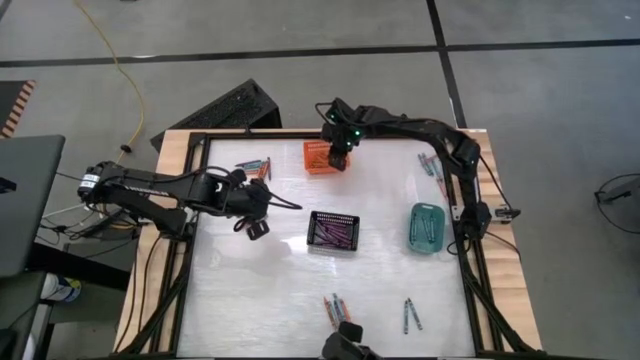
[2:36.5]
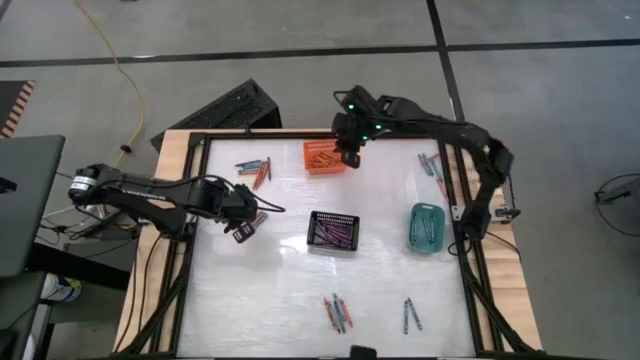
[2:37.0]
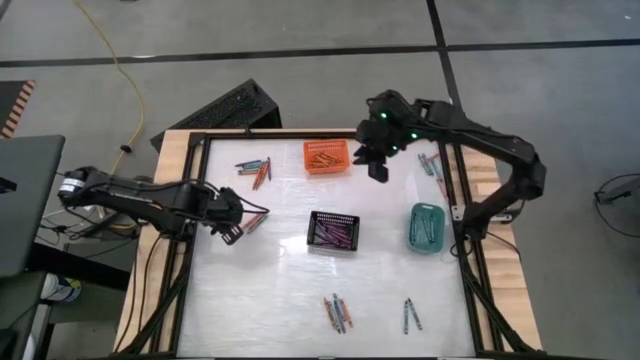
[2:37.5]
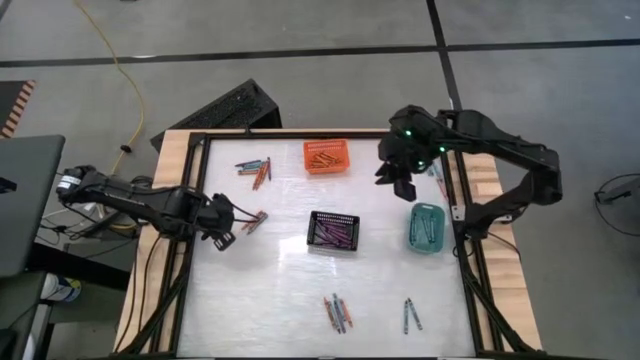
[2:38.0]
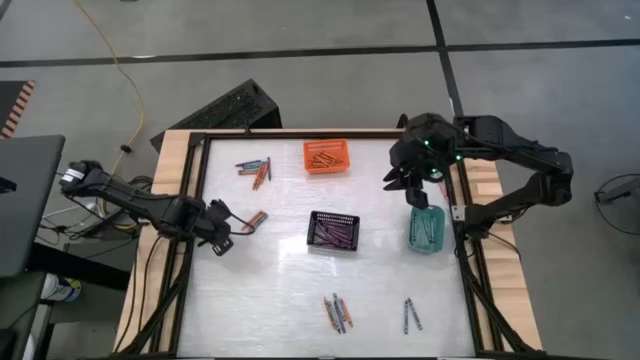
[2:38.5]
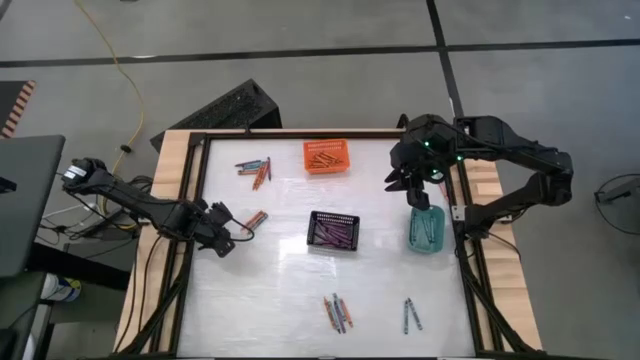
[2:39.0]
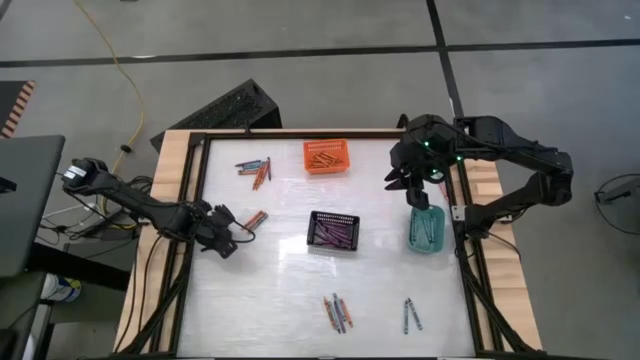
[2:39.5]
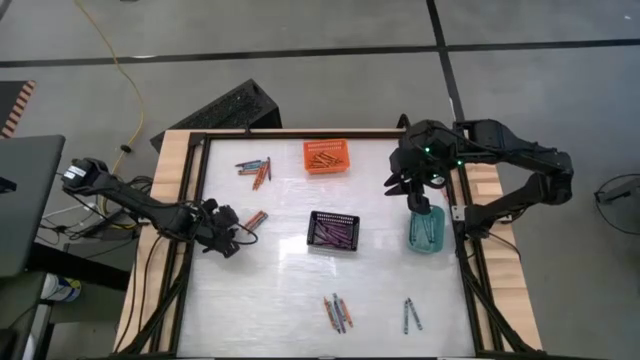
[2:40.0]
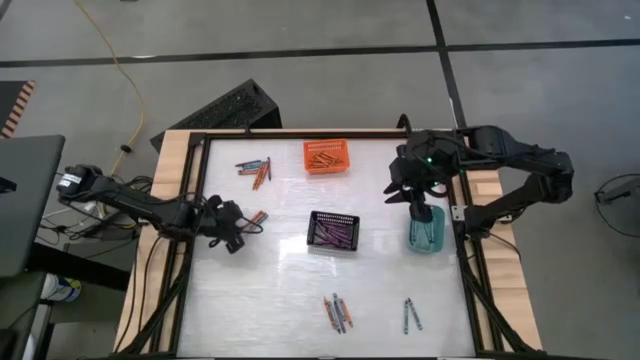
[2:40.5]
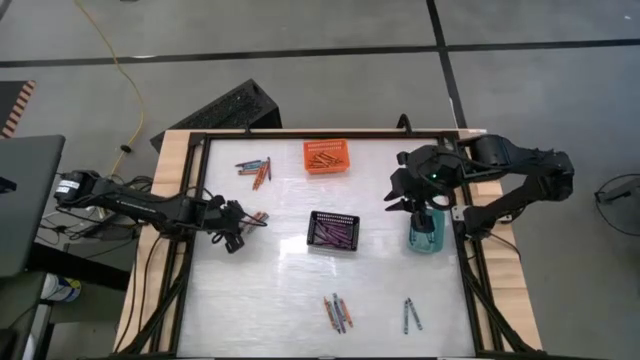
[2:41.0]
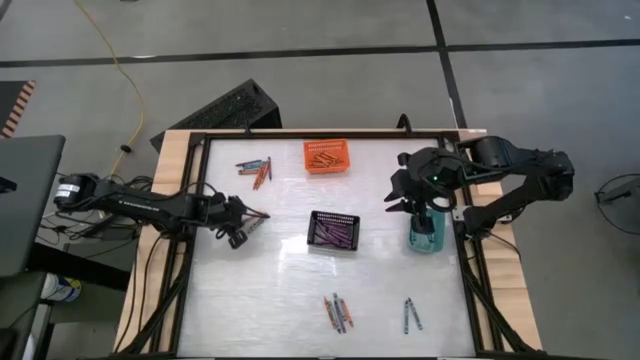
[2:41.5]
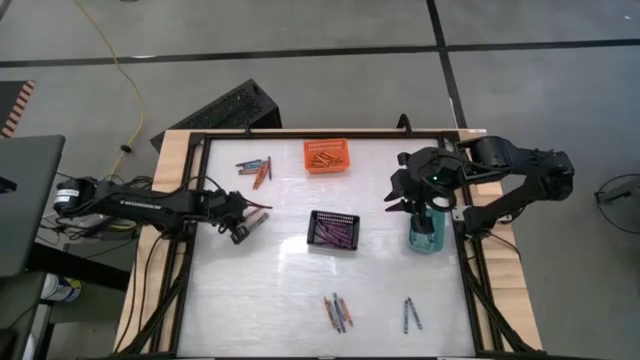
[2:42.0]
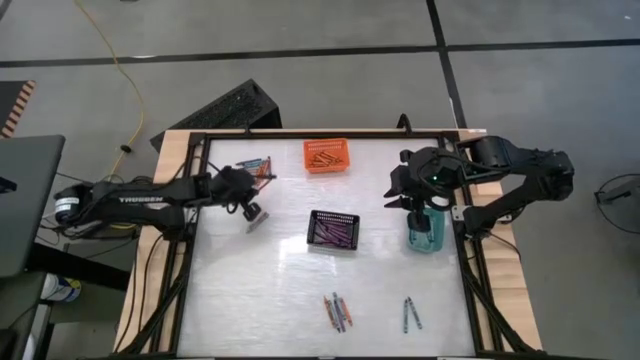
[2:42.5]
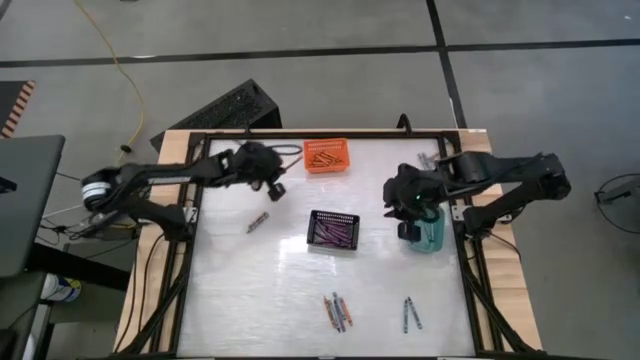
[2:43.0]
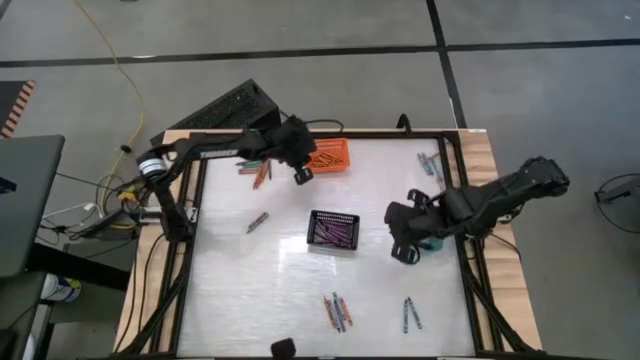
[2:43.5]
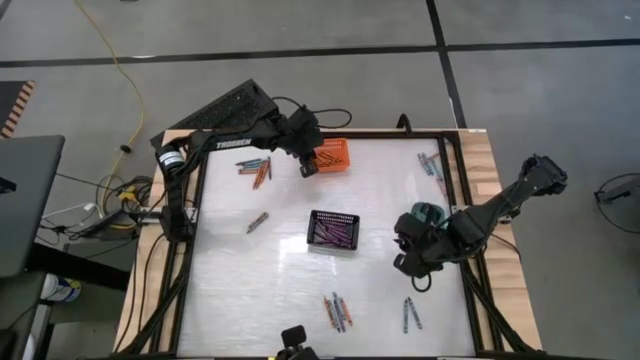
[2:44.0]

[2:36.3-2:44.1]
Task: Sort crayons
Put the orange crayon into the orange bin

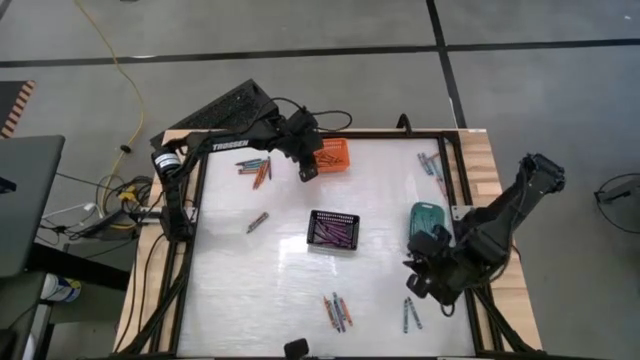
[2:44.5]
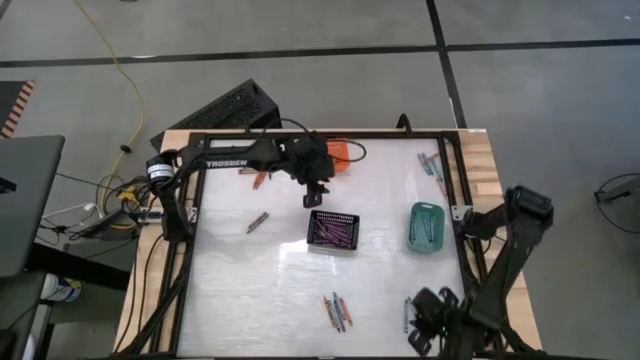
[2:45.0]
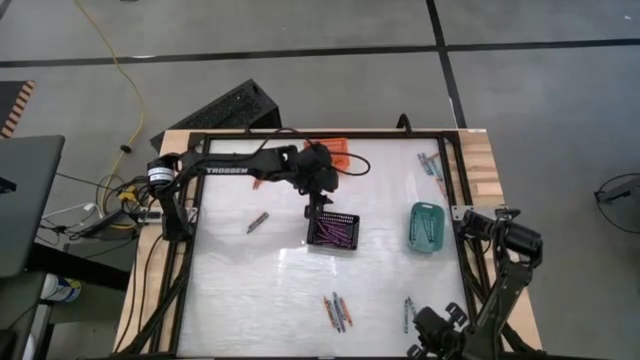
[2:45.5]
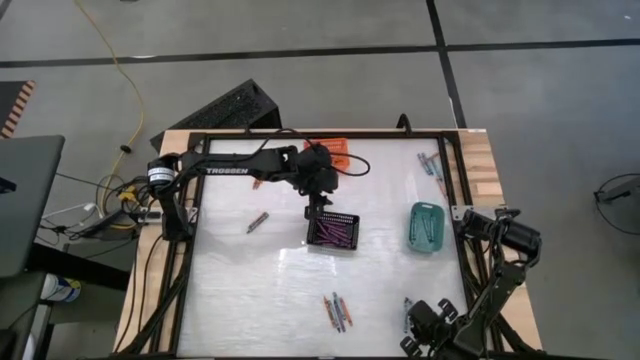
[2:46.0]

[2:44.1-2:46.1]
Put the blue green crayon into the green bin

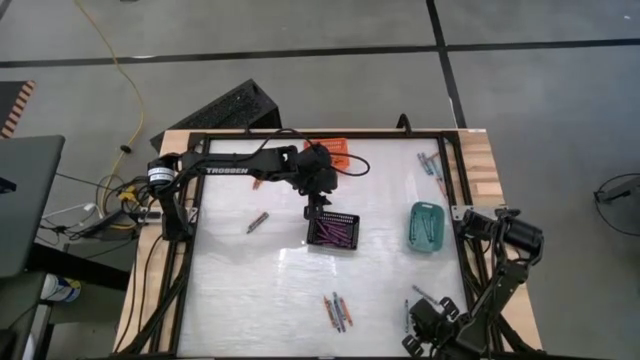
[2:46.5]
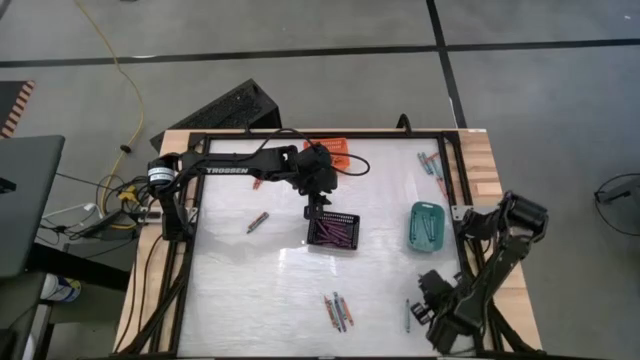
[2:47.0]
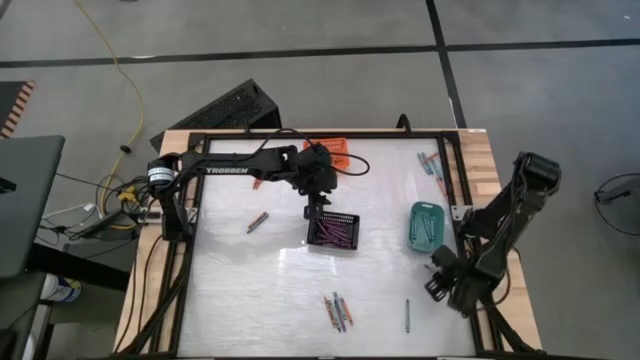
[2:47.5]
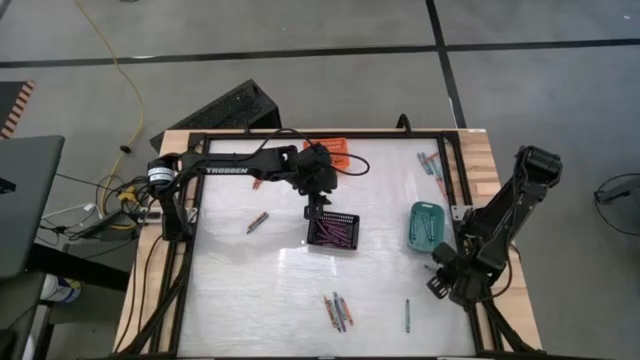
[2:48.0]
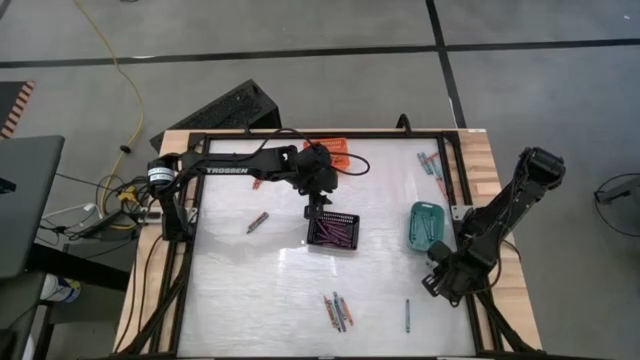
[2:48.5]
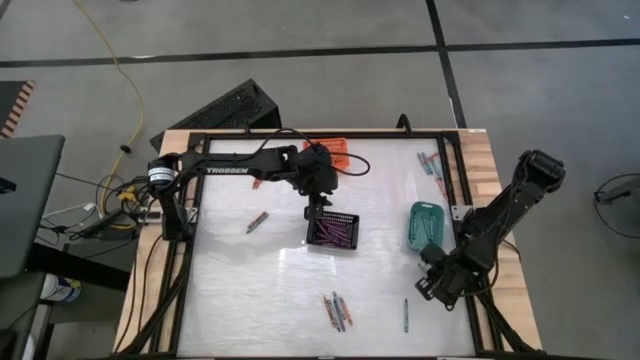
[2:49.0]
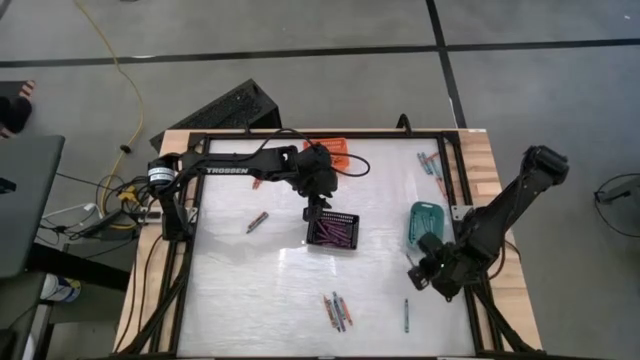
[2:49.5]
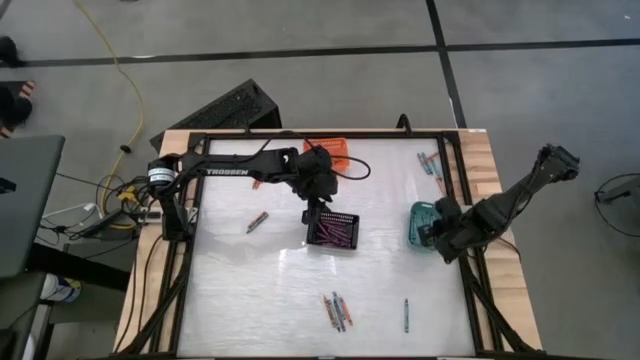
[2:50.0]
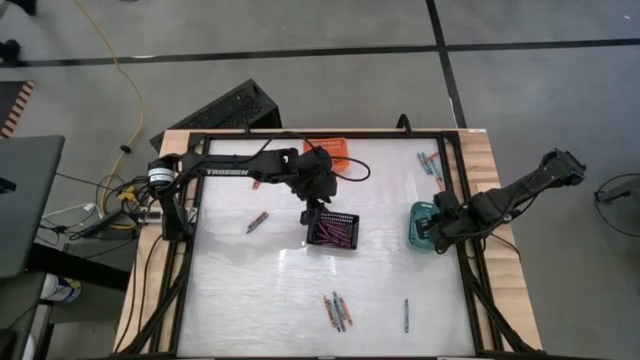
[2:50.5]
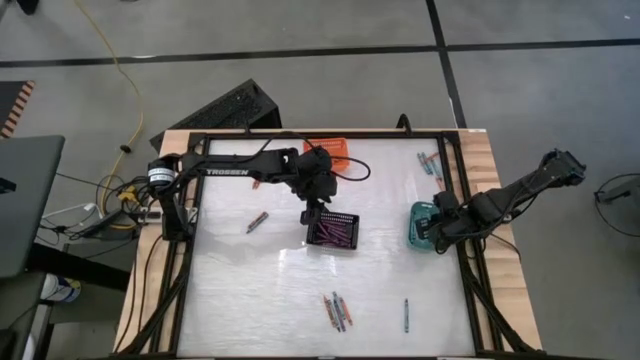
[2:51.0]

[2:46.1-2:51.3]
Put the blue green crayon into the green bin

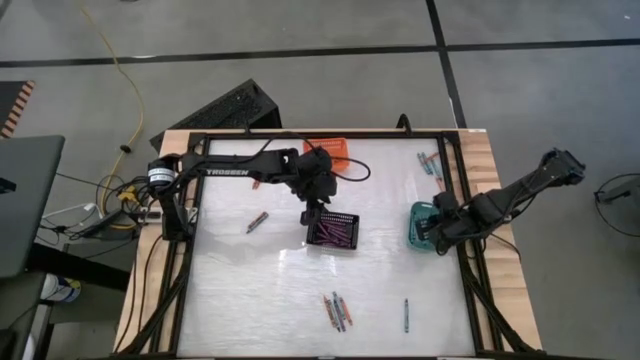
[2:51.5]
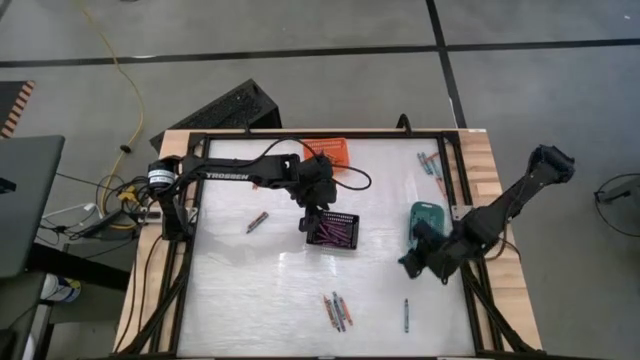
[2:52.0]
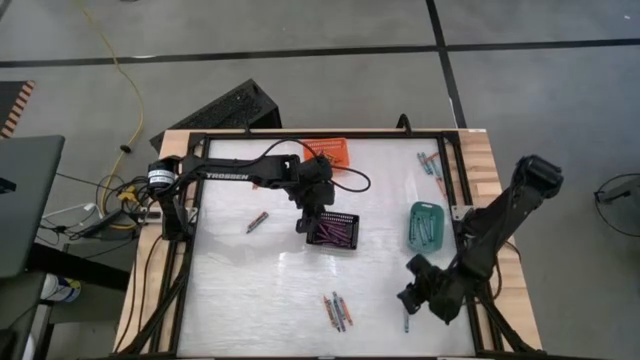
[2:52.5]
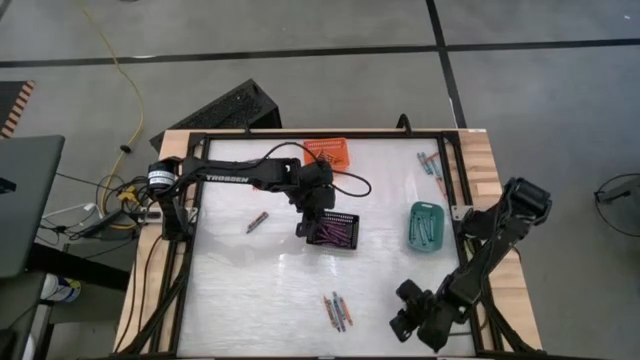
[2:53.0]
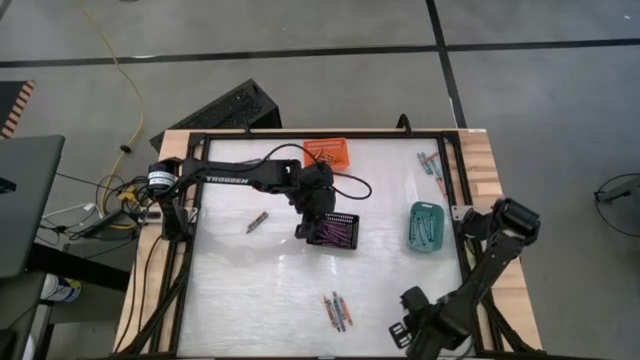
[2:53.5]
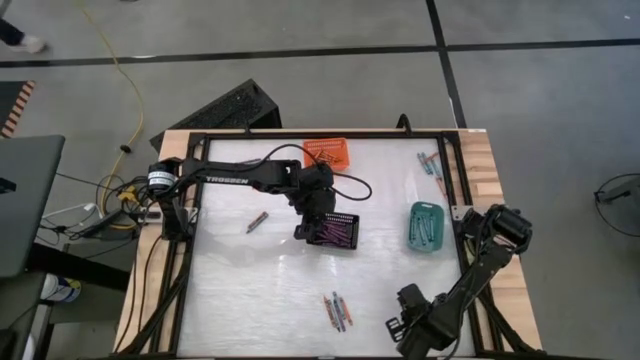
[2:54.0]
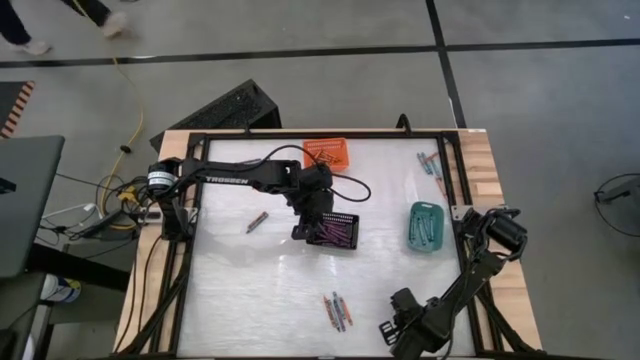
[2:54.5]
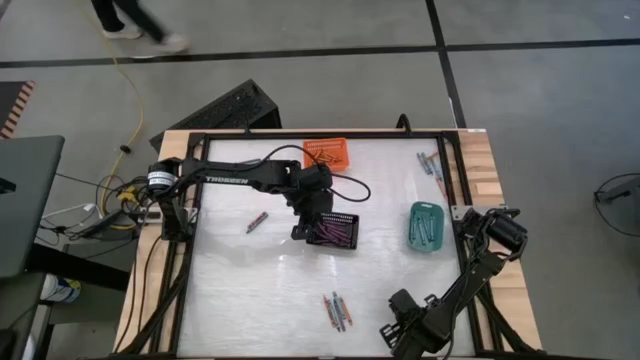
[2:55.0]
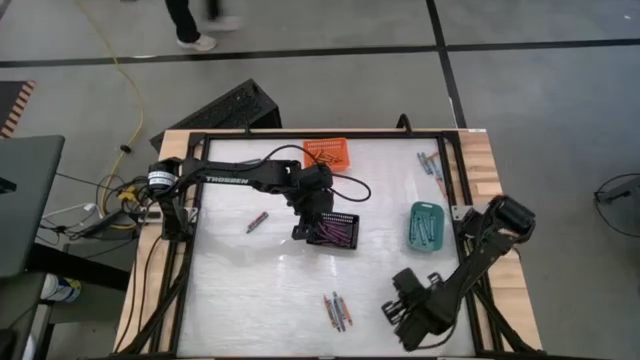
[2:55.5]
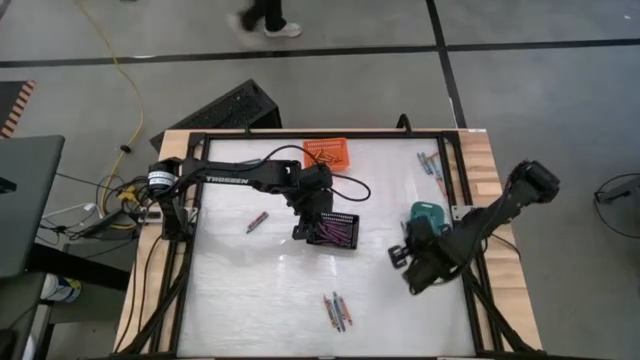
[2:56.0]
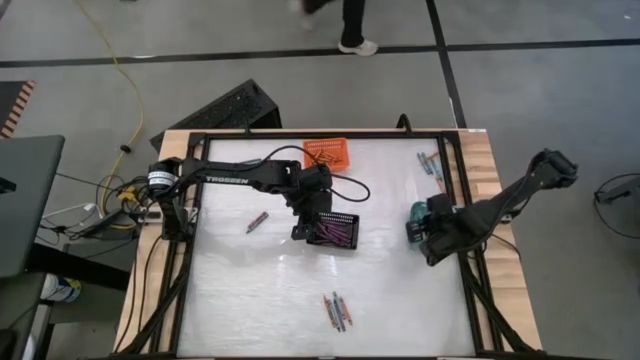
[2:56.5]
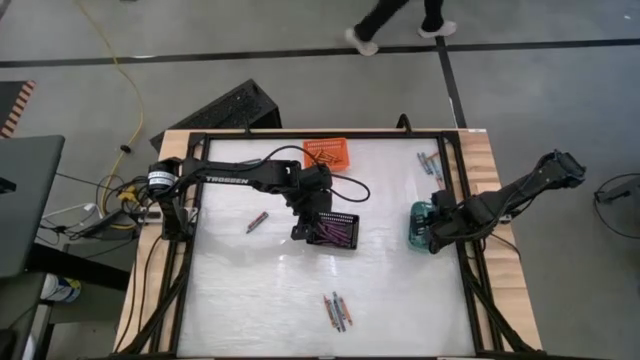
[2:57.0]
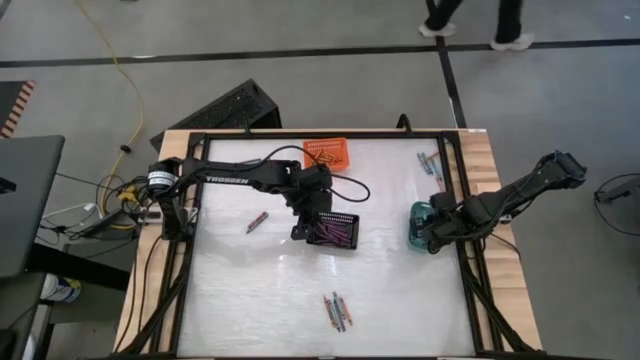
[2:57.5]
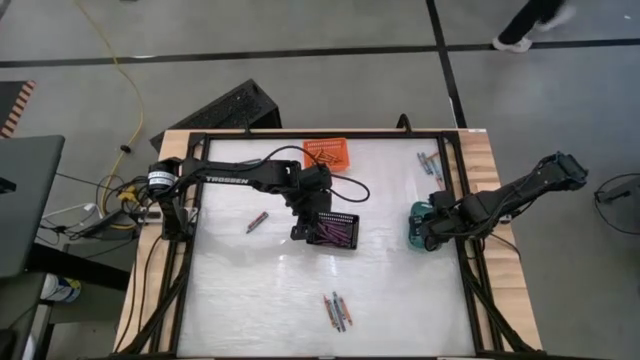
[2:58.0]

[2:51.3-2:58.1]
Put the blue green crayon into the green bin
